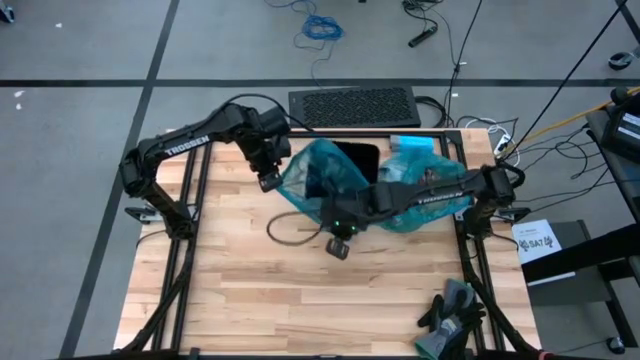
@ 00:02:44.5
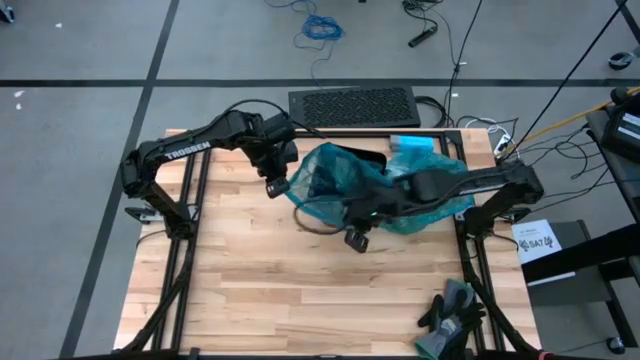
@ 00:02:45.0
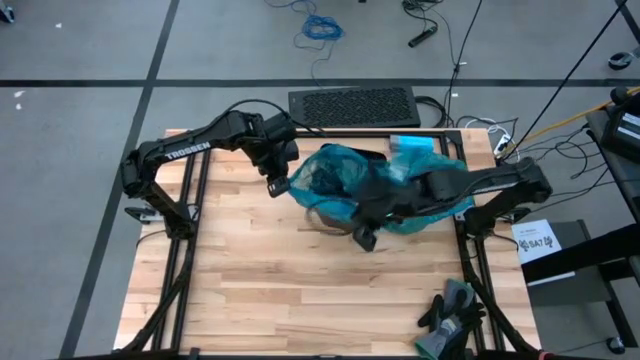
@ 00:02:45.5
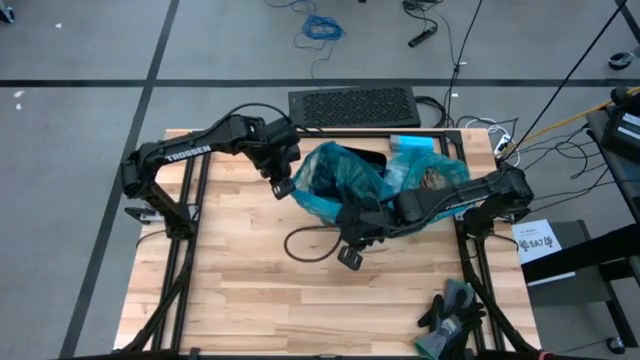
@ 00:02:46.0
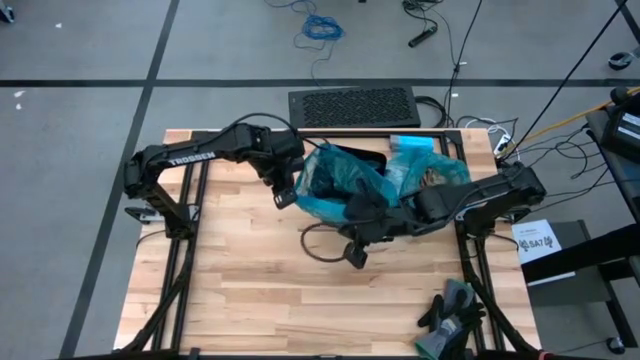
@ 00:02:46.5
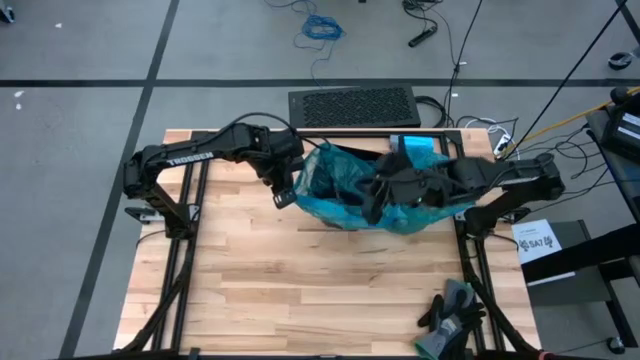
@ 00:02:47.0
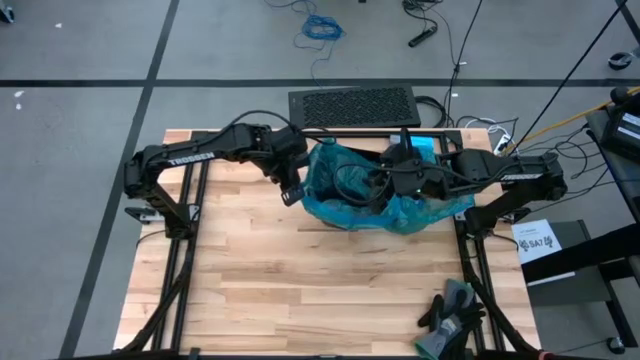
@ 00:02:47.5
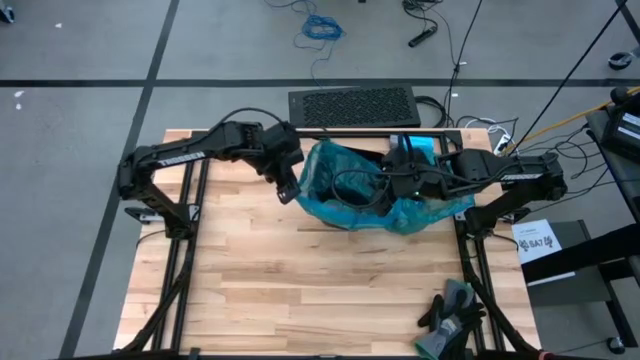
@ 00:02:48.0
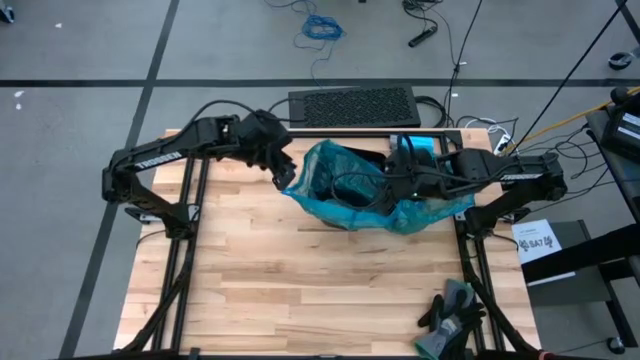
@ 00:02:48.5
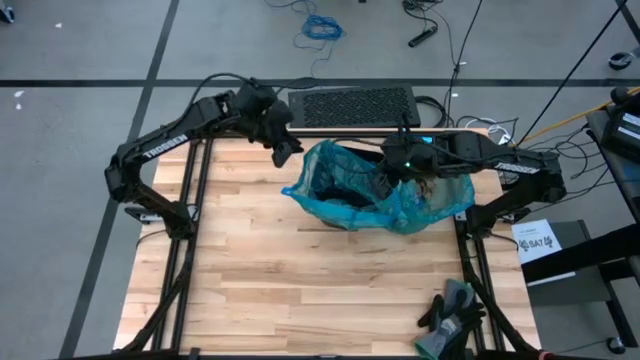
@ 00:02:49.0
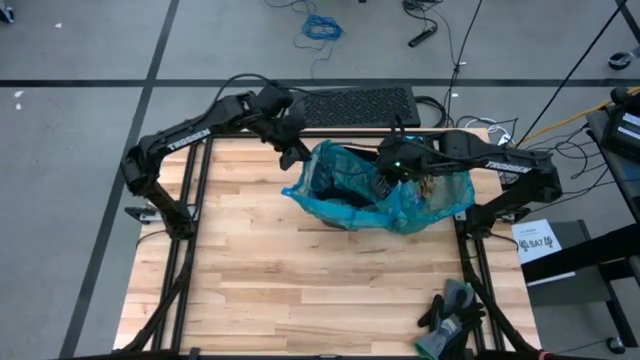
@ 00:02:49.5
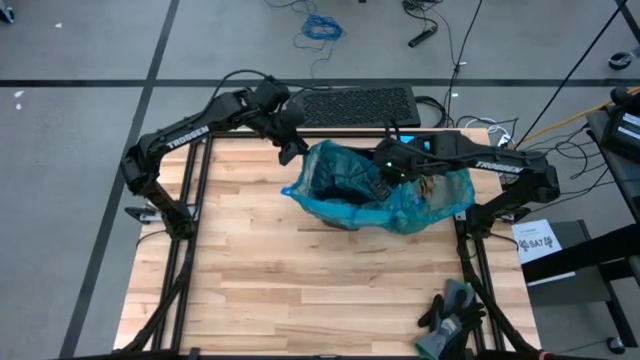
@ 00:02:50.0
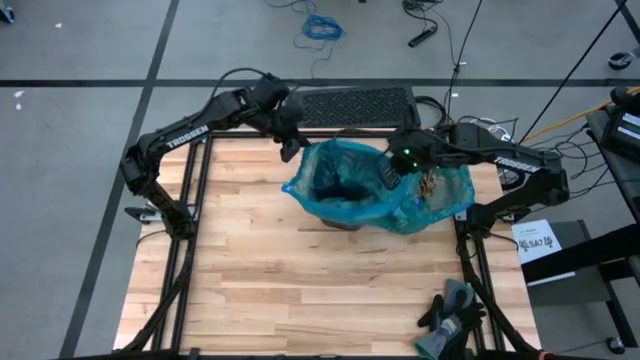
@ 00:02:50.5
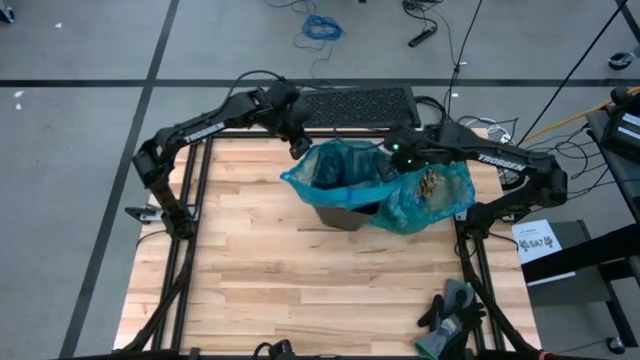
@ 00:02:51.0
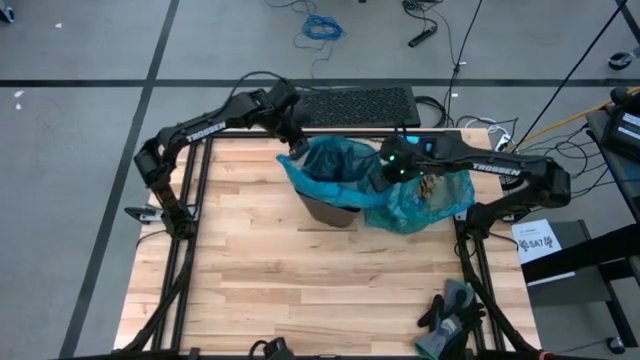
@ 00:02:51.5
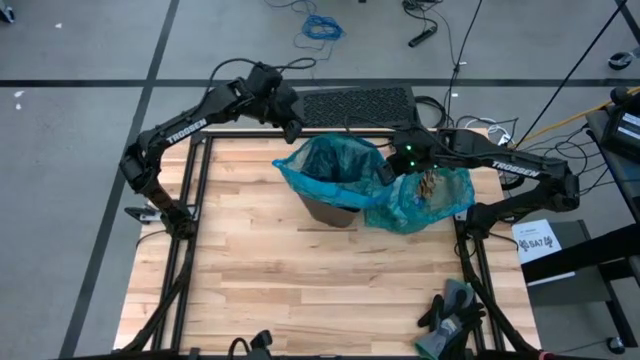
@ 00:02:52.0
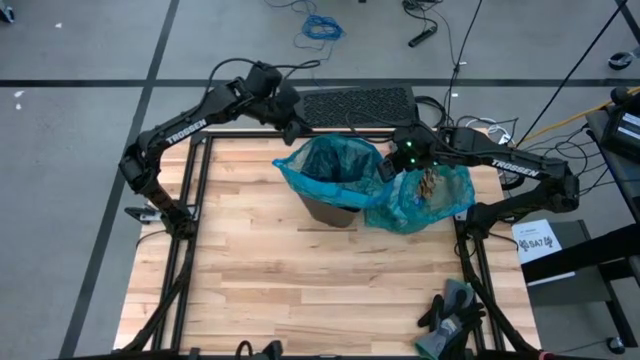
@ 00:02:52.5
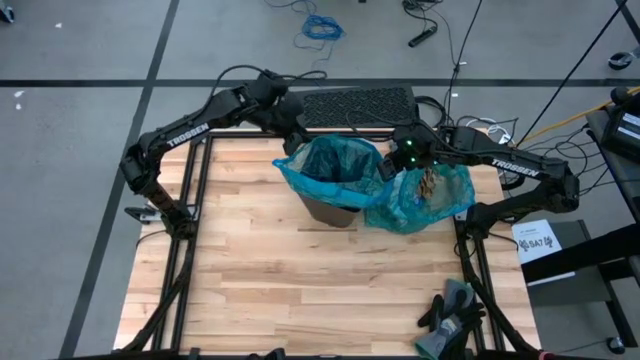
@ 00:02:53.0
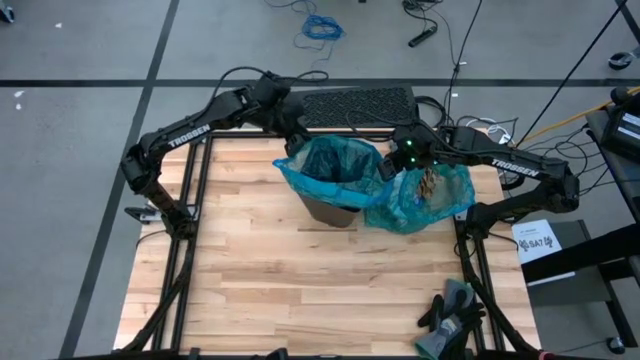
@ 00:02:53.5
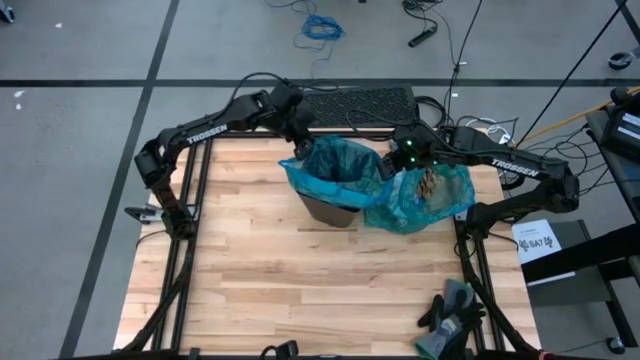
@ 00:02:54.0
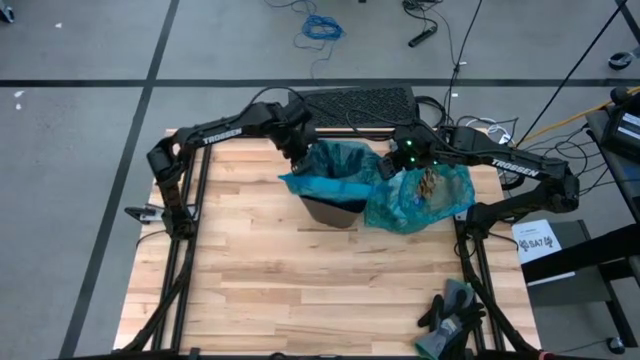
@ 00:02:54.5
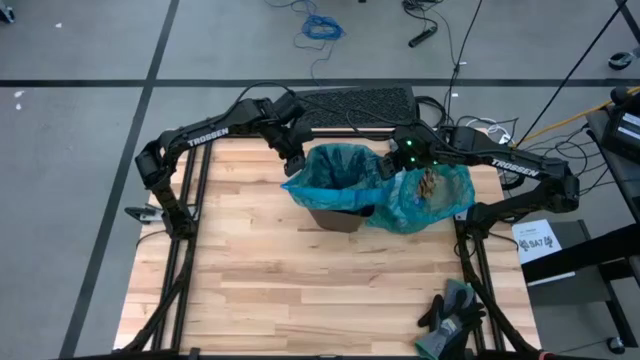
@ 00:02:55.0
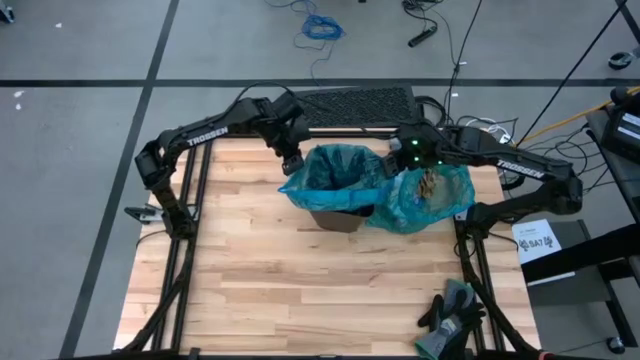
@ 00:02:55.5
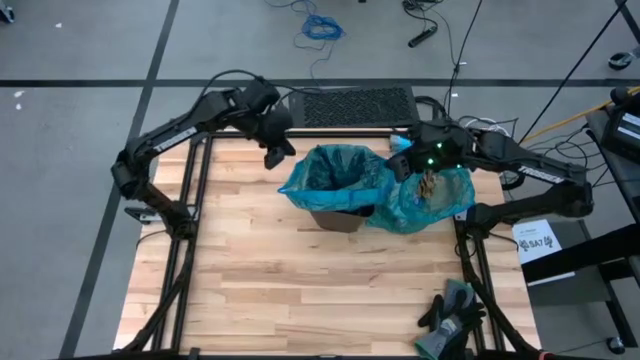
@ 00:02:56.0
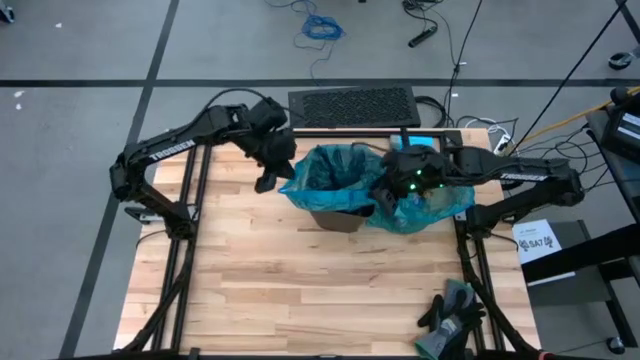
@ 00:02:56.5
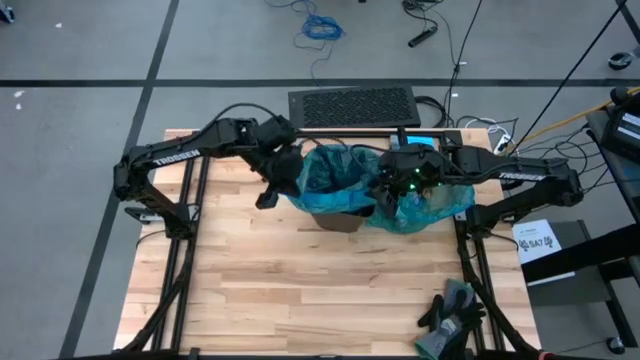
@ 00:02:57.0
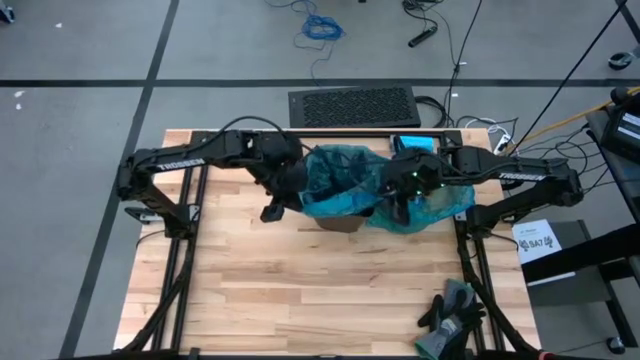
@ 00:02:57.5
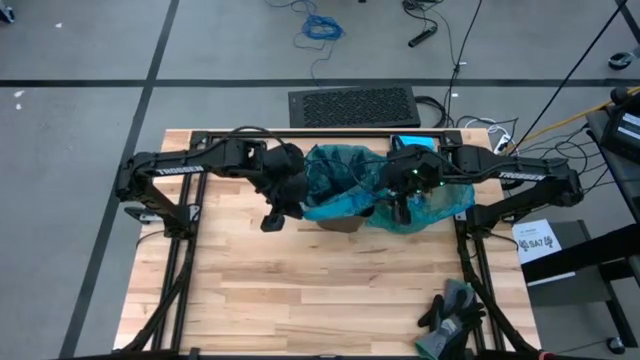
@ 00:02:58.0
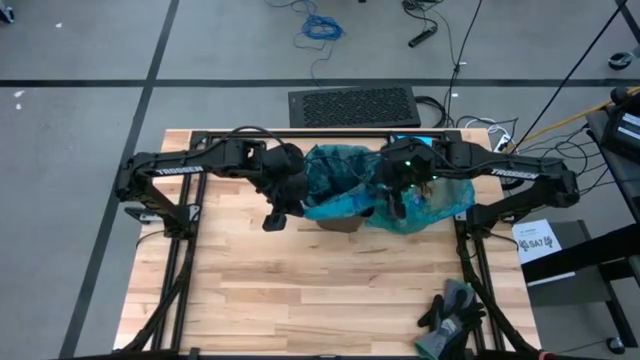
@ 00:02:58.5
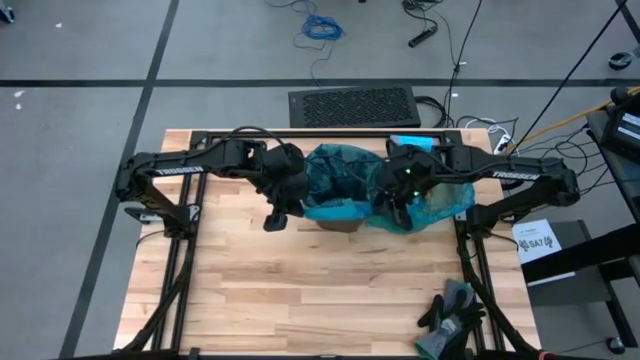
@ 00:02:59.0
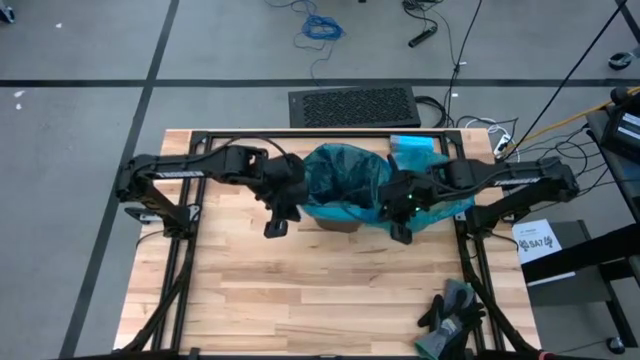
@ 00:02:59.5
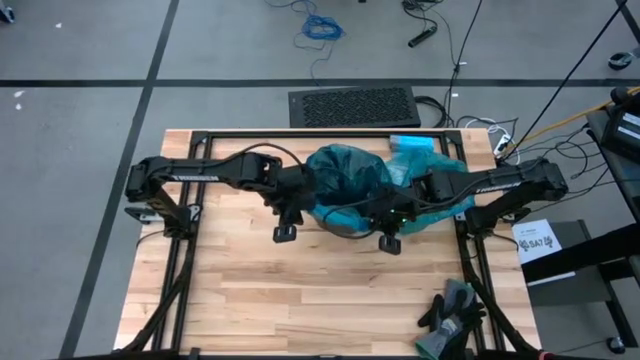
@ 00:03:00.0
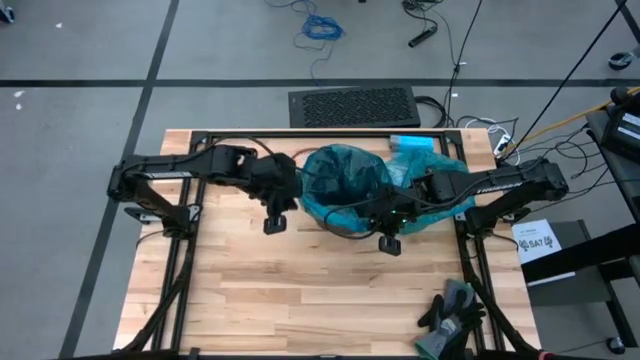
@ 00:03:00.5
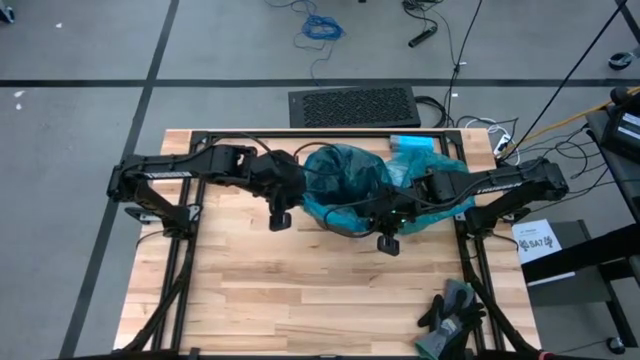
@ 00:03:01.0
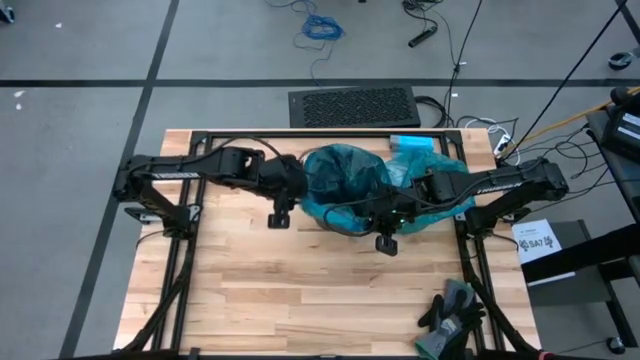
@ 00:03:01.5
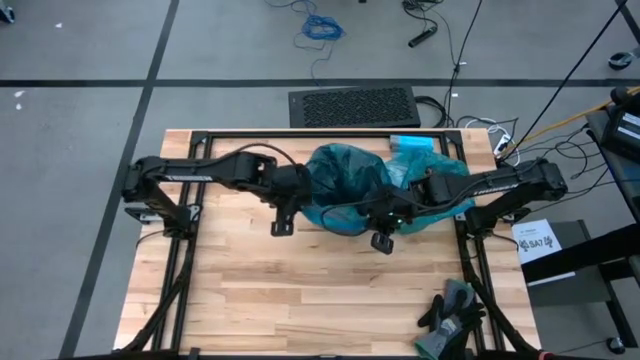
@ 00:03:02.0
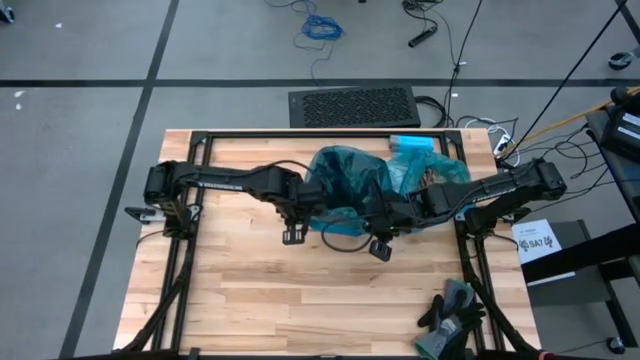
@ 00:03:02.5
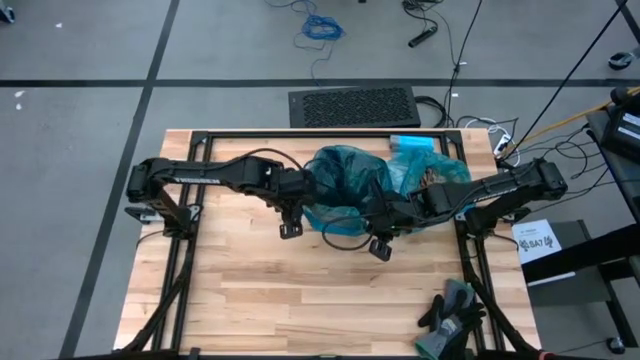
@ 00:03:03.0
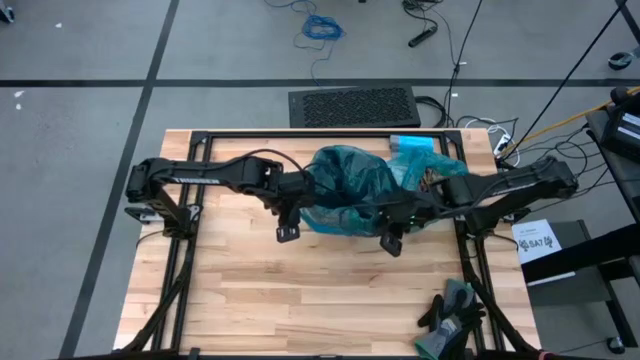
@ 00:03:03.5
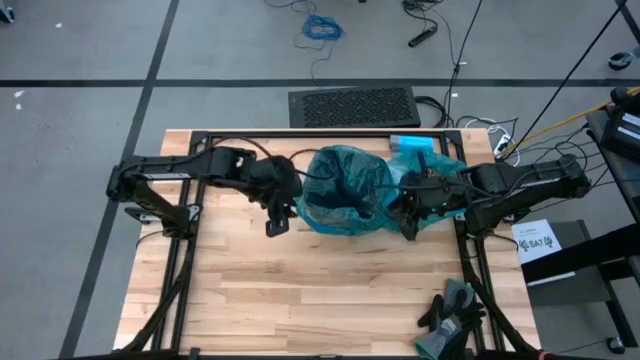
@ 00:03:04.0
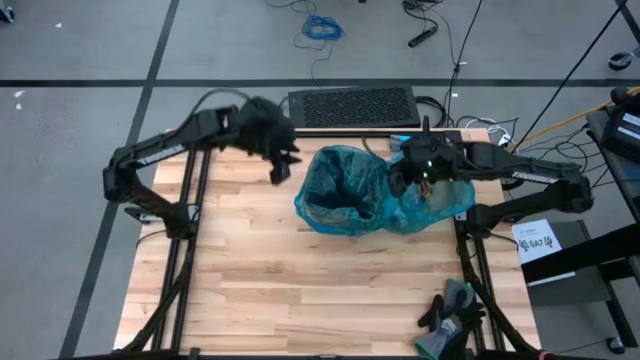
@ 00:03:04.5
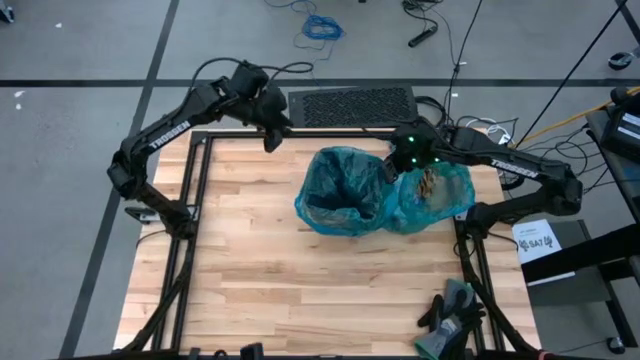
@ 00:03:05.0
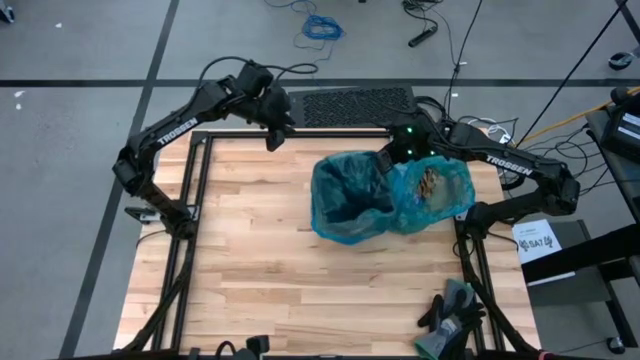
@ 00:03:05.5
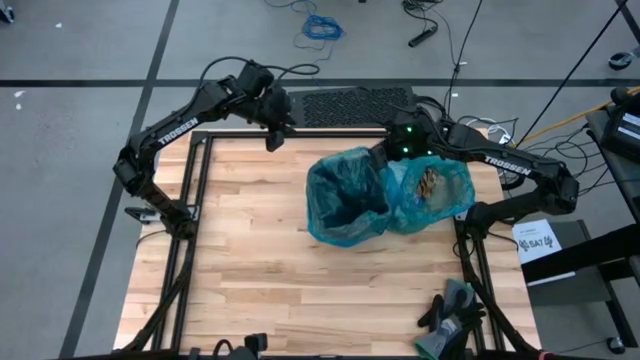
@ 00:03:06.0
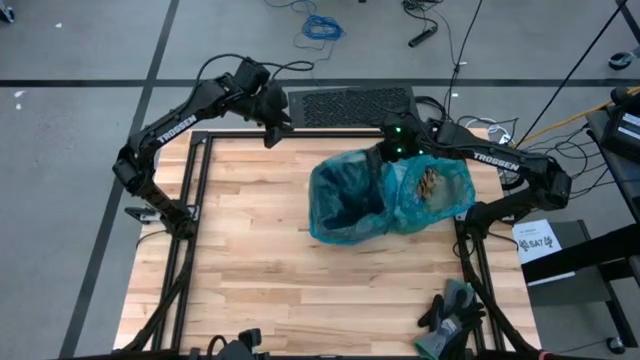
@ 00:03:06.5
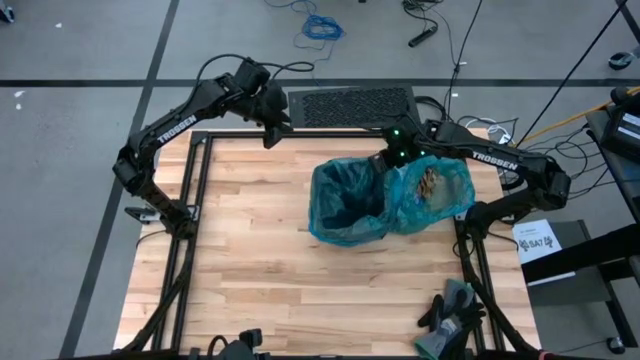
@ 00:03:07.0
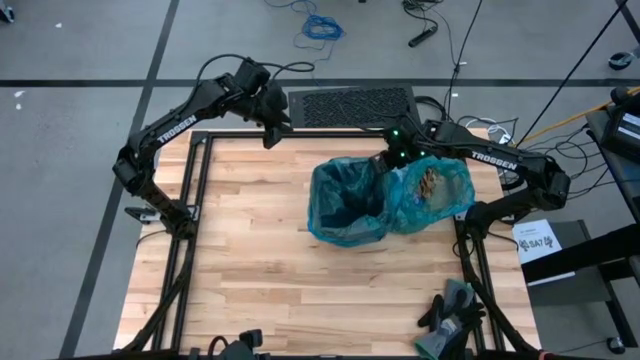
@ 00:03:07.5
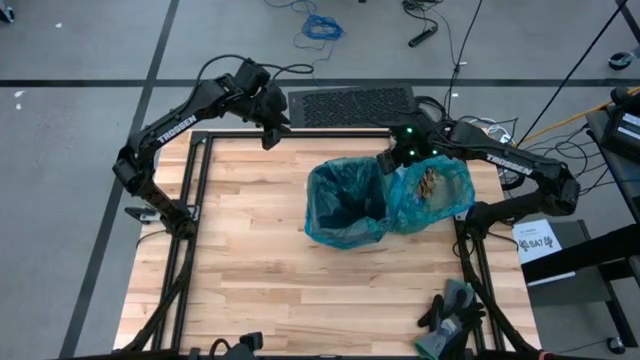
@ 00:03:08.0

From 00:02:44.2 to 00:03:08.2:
Task: place trash/remove bag and relplace
Put the blue trash bag into the black trash bin
